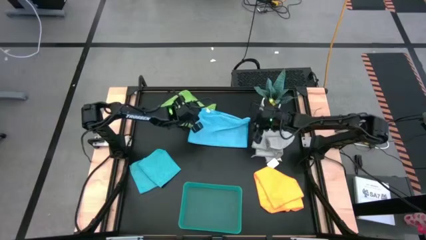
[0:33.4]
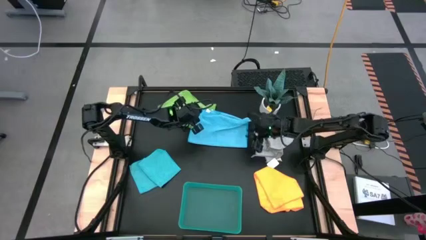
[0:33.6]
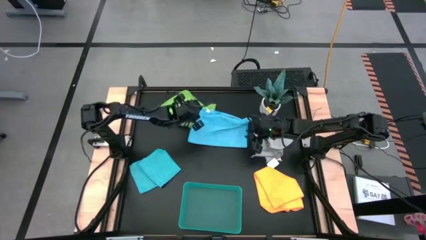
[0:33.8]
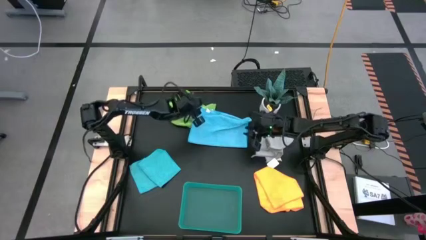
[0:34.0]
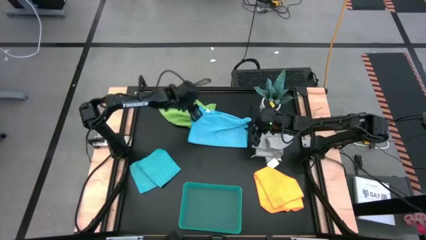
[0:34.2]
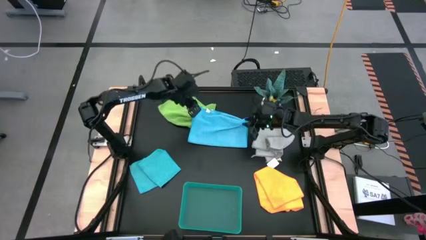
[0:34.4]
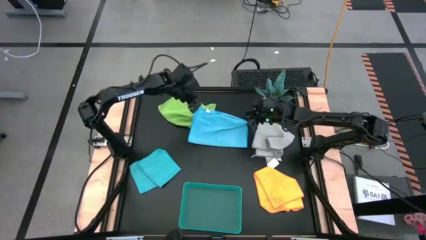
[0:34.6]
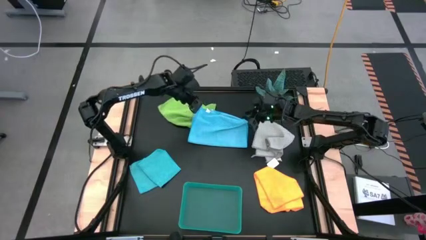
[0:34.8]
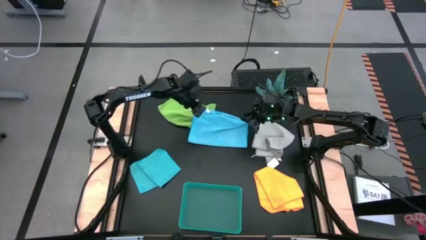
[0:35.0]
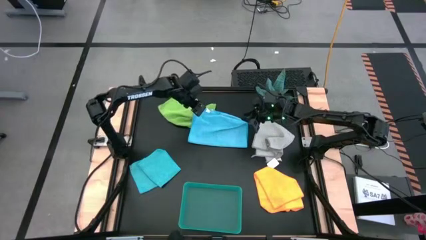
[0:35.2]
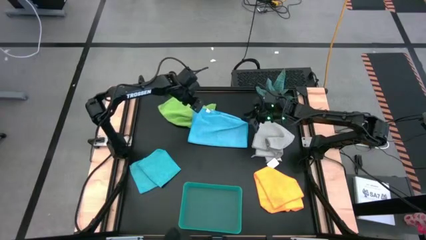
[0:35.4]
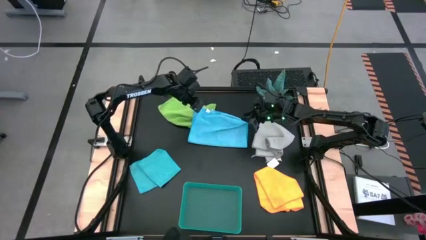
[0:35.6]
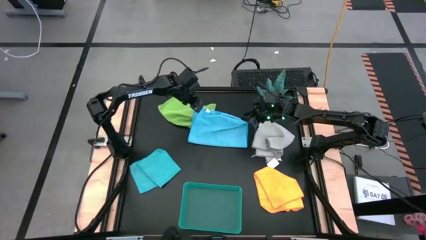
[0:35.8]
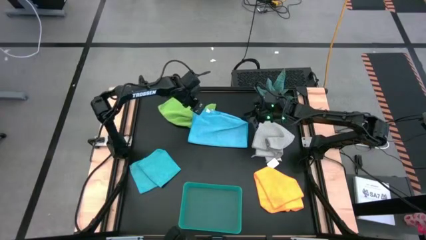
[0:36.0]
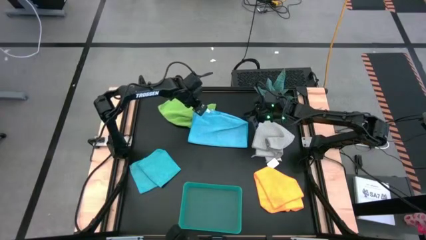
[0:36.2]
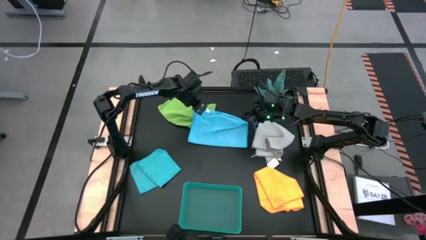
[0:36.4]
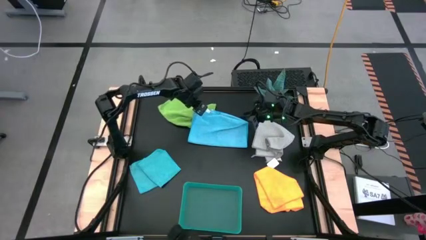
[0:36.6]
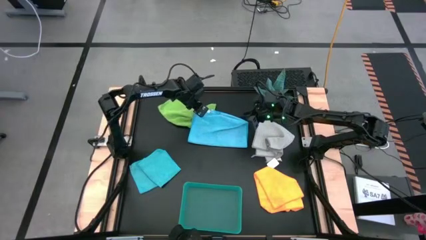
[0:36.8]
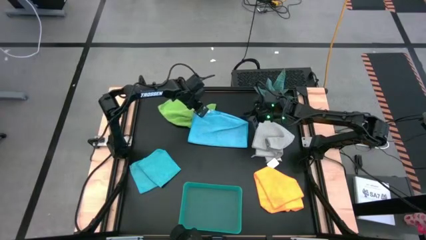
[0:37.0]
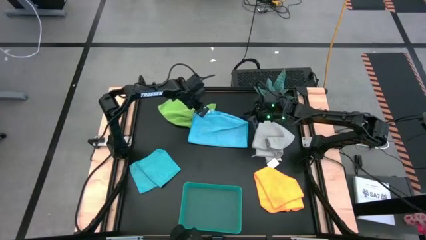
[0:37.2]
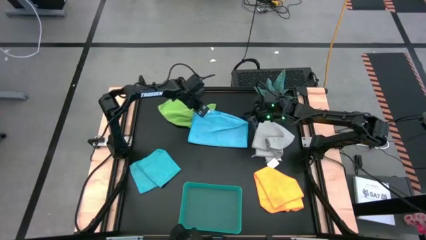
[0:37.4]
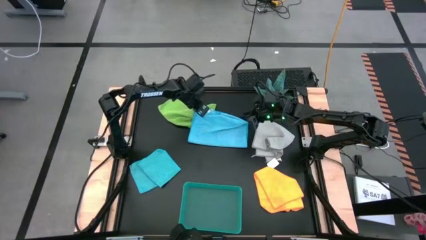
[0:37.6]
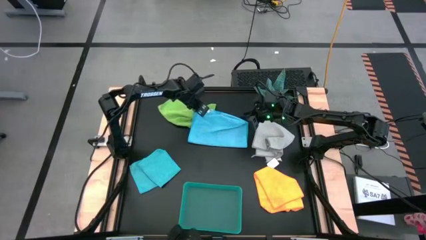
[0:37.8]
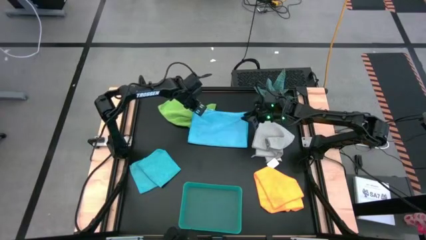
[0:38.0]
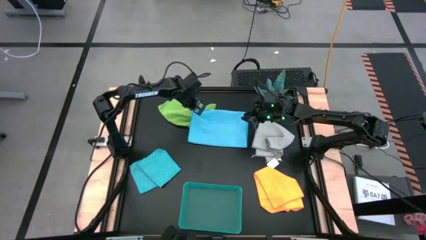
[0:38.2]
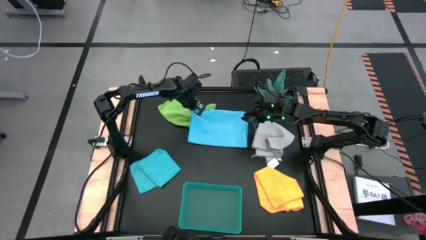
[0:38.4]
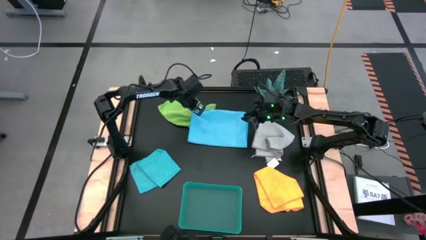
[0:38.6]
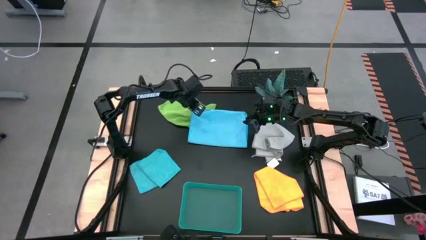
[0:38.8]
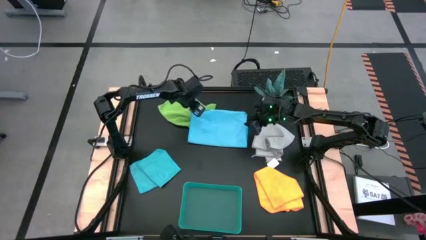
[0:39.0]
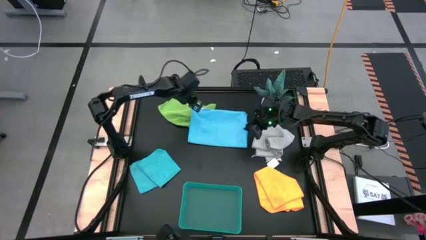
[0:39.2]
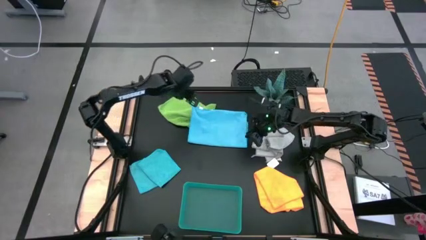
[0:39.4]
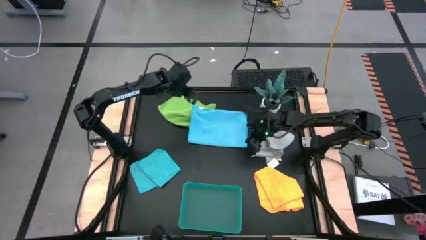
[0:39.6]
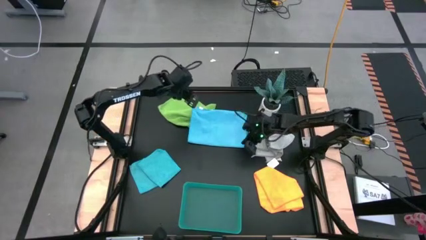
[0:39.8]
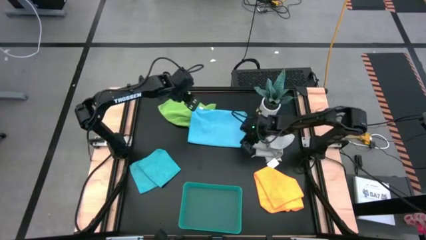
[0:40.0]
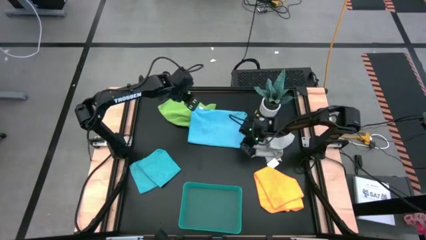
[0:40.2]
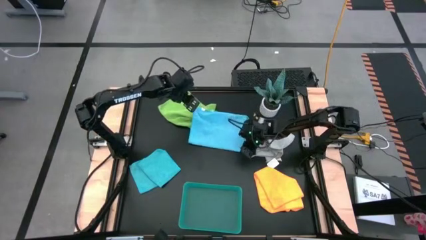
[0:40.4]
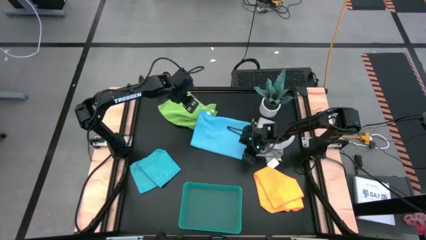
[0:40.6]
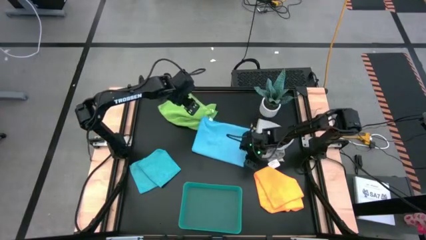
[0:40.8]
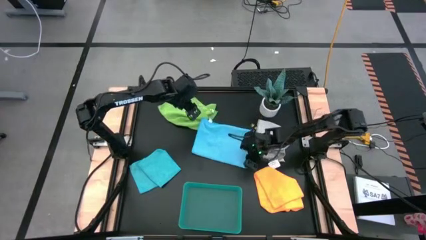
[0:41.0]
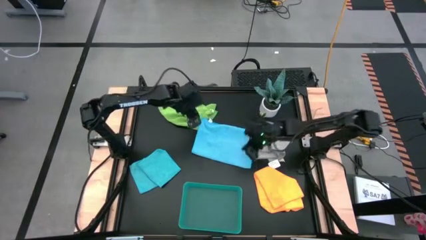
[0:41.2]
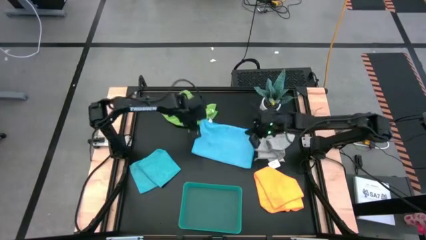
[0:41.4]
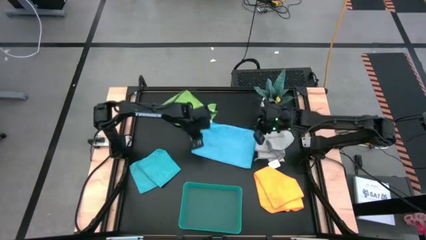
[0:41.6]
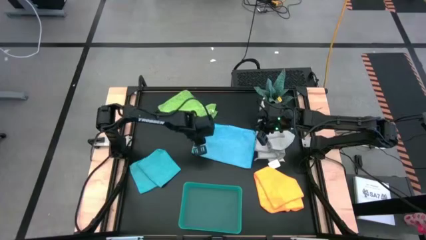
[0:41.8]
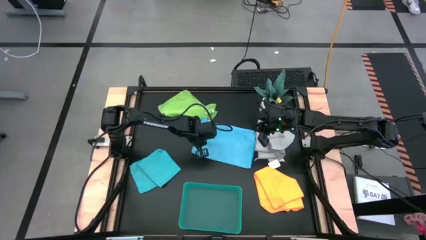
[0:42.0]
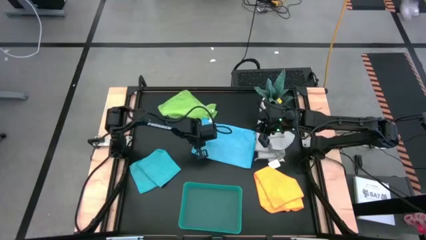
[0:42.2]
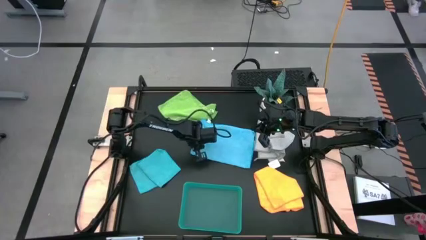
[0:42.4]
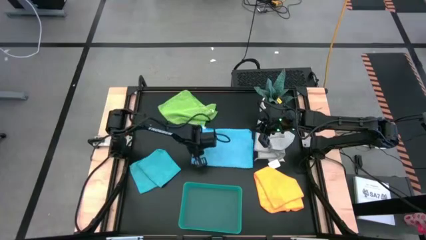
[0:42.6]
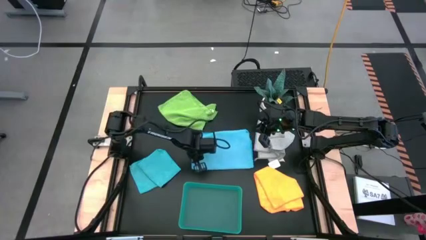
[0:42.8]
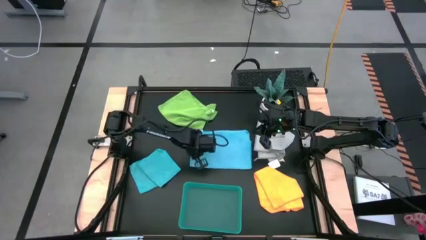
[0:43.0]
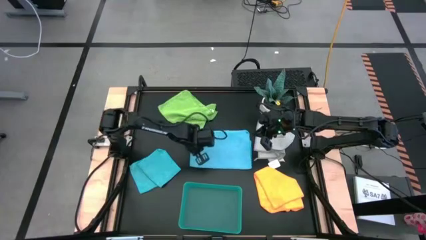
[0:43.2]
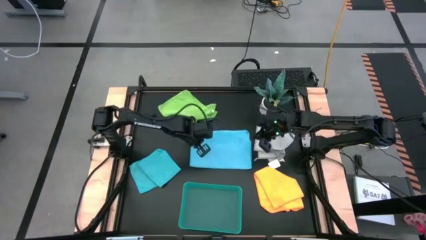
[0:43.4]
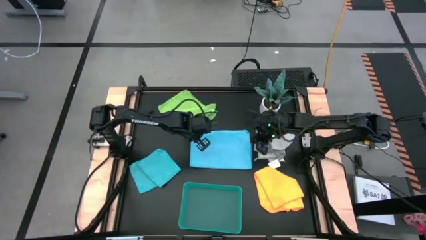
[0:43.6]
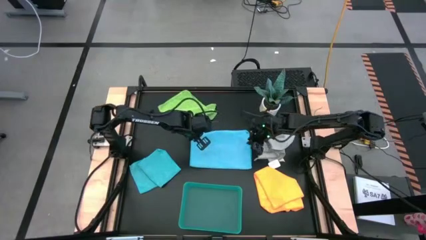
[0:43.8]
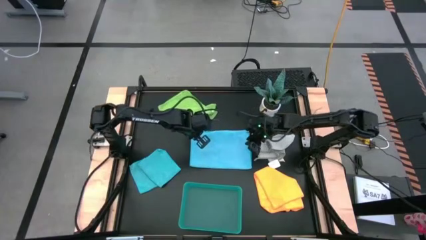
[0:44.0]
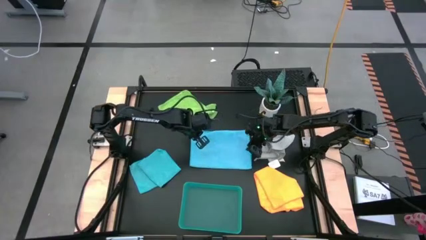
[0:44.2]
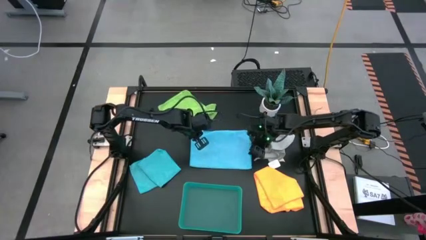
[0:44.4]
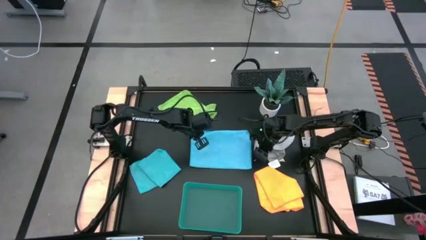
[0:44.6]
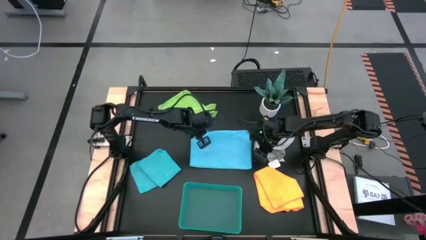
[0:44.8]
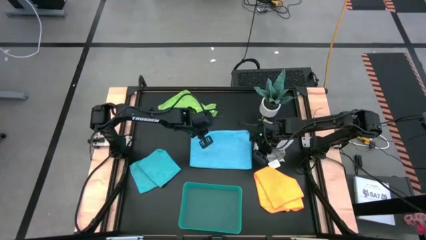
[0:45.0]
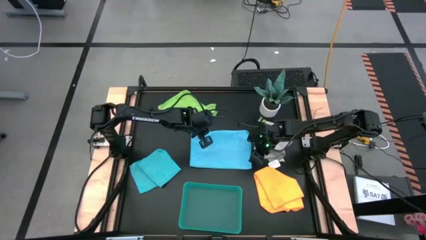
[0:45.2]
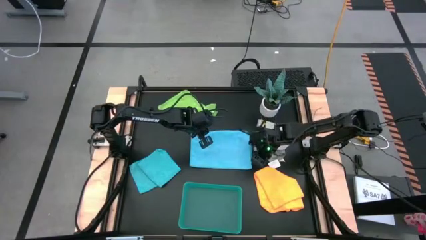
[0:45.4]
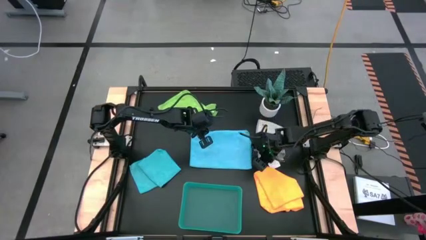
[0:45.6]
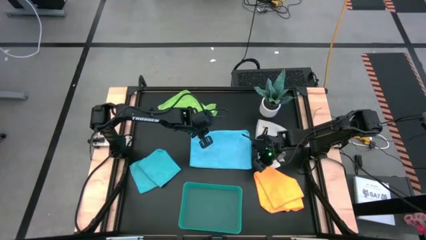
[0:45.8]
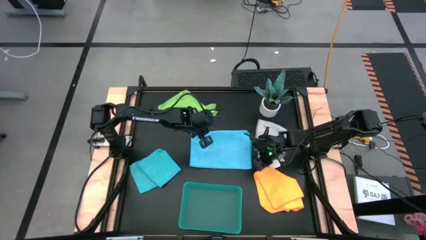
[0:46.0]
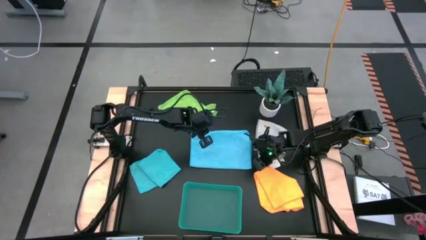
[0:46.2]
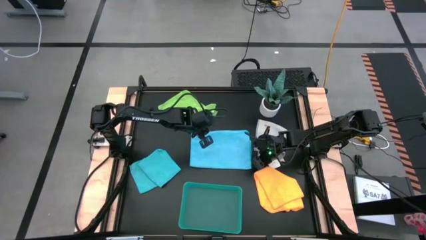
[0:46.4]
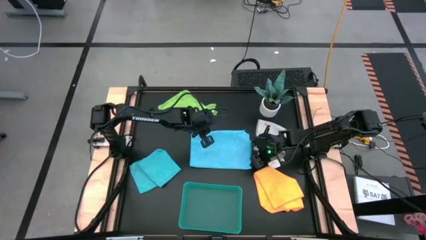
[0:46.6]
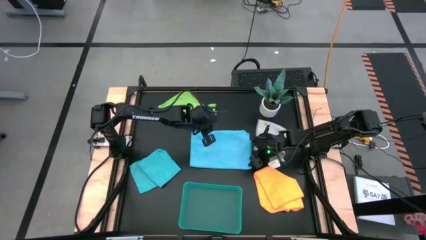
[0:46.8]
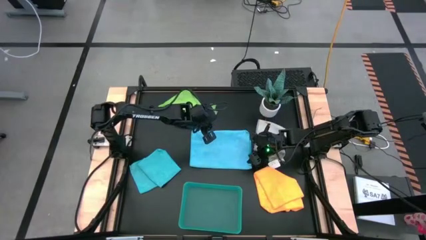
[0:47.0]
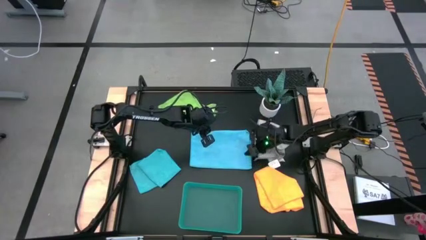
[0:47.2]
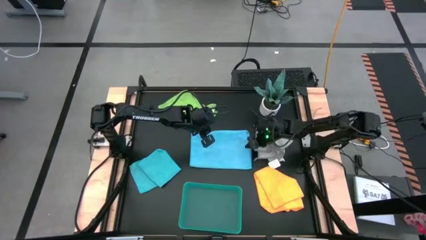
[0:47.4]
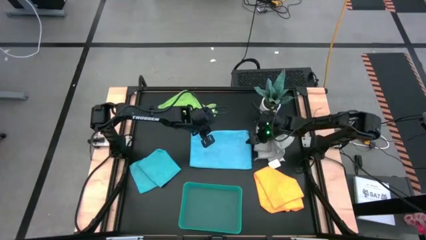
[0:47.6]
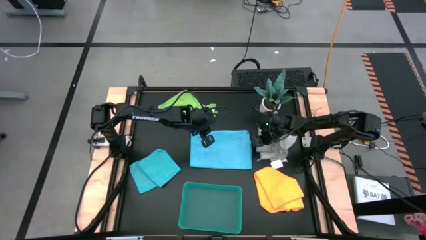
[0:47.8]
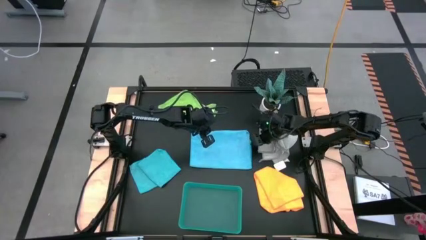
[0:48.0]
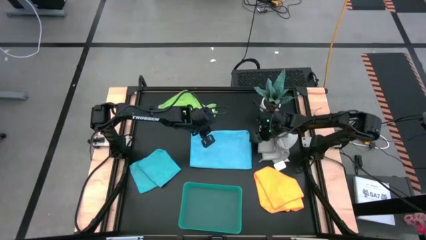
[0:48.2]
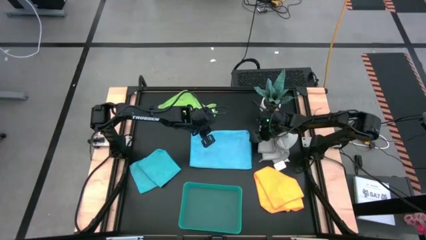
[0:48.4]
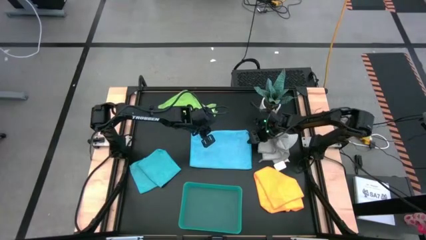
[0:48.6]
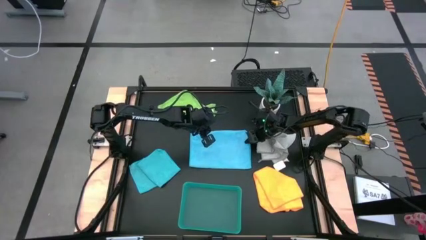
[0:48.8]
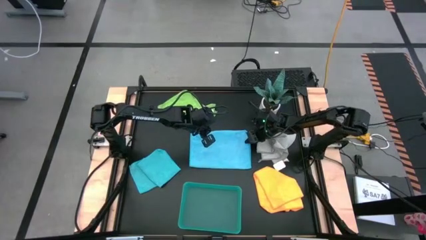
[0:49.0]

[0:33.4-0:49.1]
Task: Fold microfiber towels
Fold the right blue microfiber cloth
